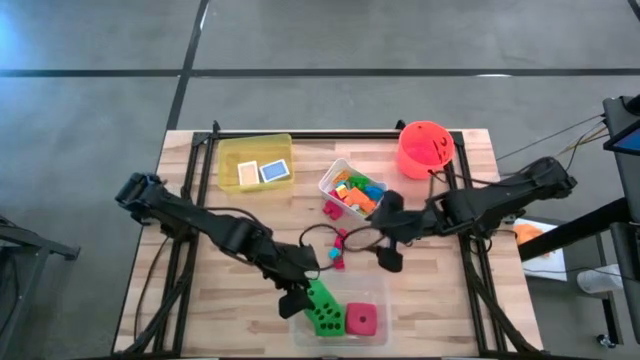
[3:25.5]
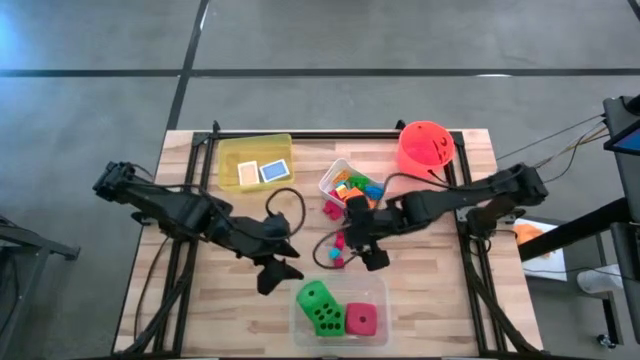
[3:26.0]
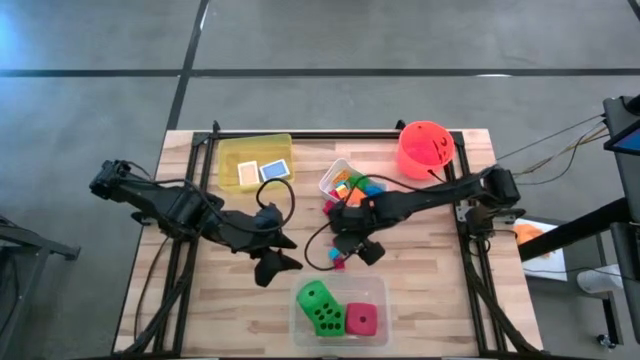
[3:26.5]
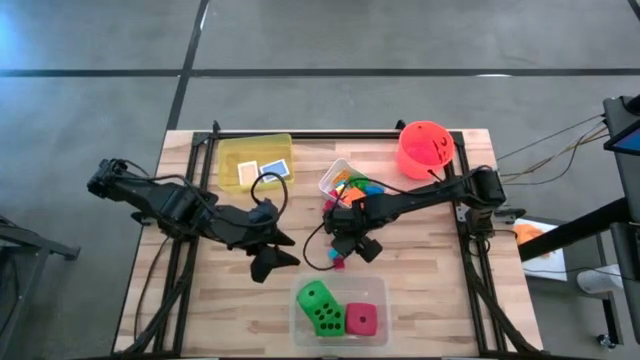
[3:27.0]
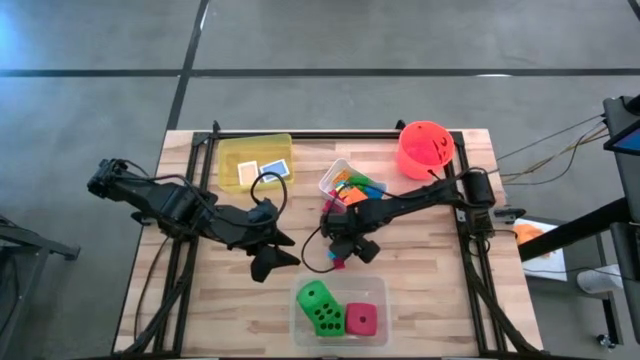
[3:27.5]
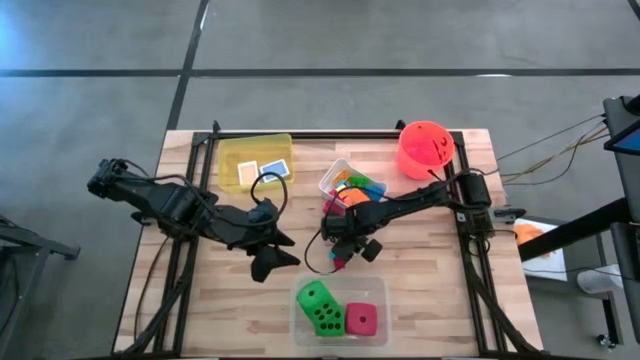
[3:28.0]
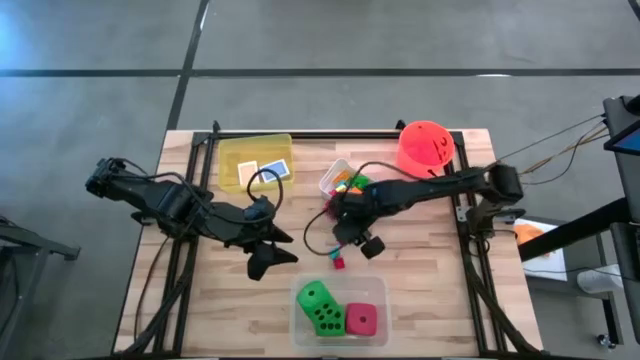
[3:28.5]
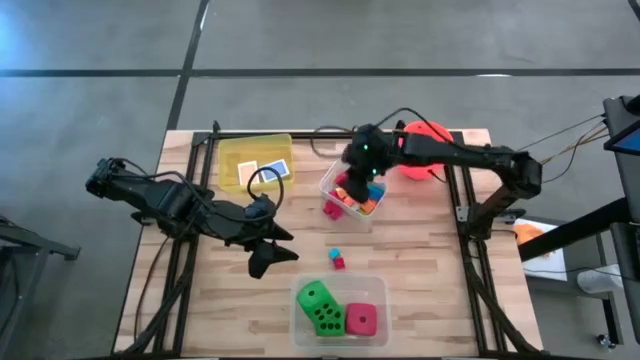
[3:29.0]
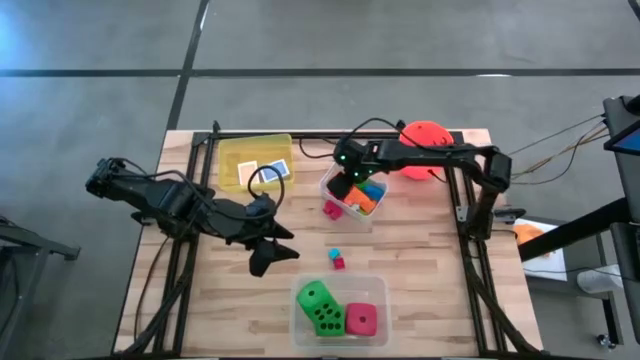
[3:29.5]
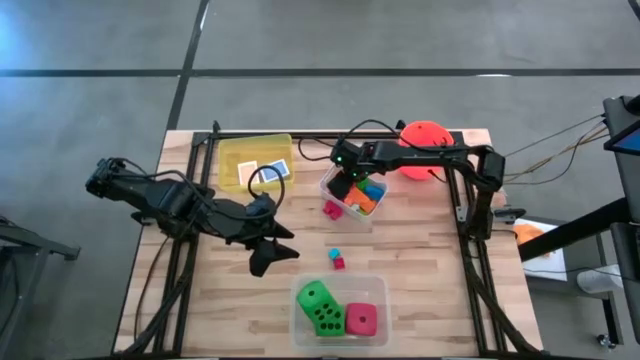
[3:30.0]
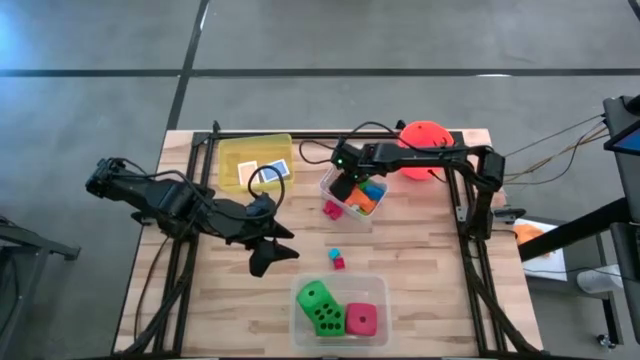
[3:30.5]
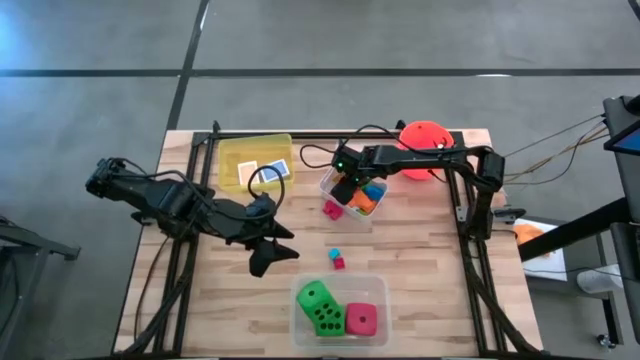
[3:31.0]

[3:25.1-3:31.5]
Task: Pick & Place Toys
Put the red game piece into the white bin

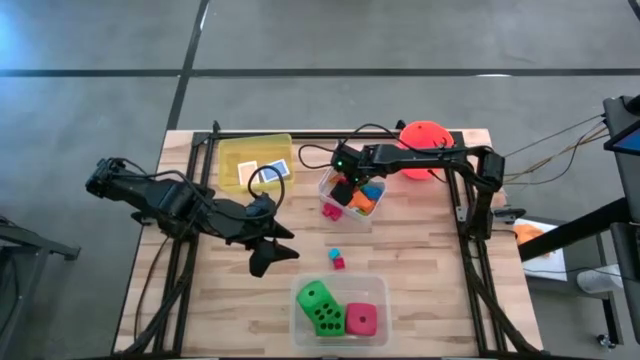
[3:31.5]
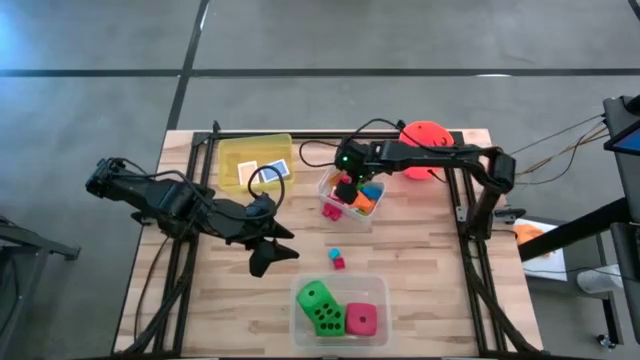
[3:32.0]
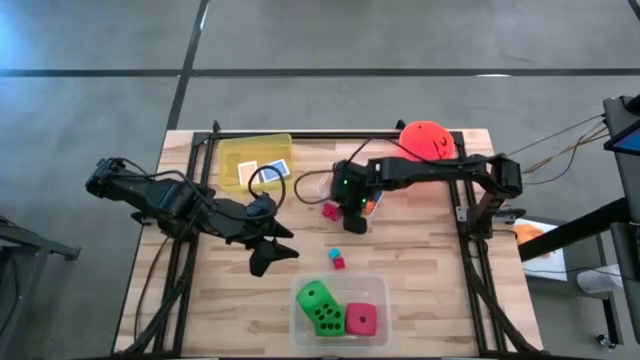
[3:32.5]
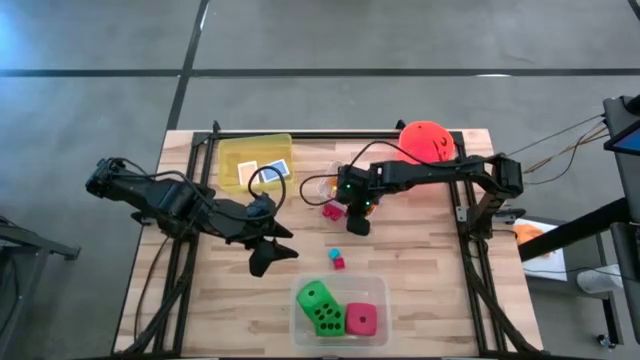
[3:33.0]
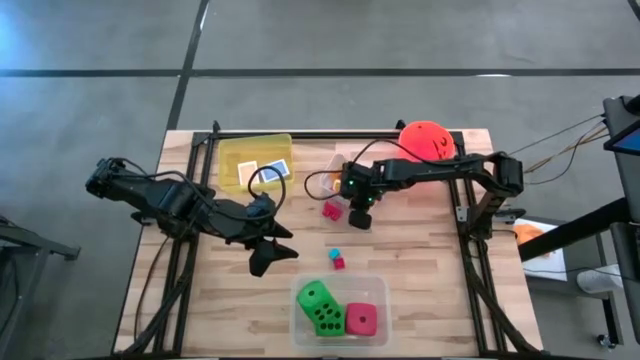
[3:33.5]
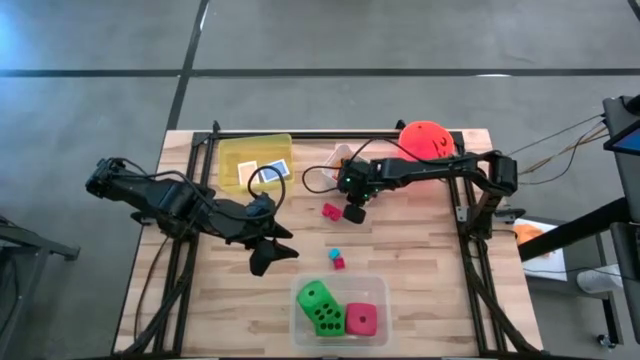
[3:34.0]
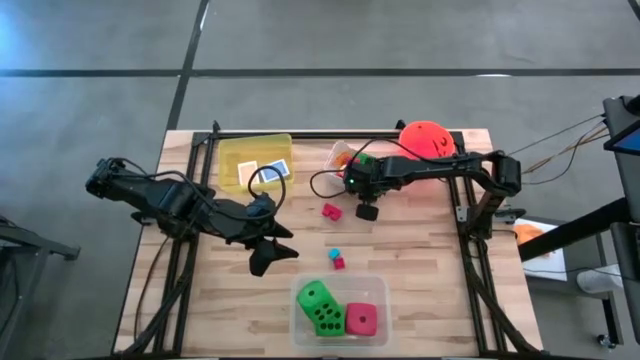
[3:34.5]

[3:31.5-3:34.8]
Adjust the white bin

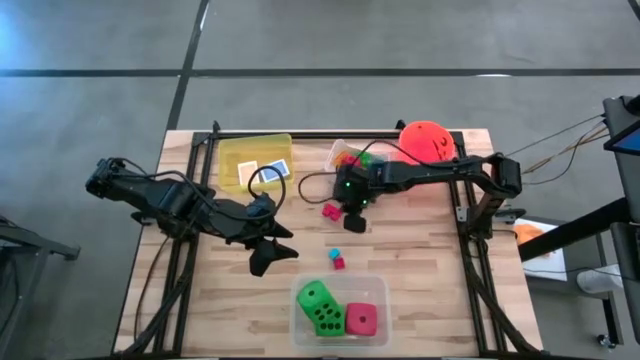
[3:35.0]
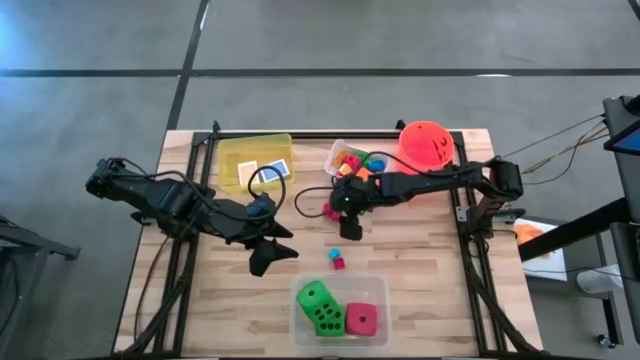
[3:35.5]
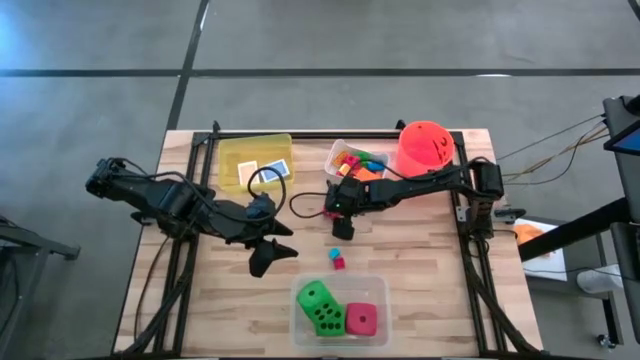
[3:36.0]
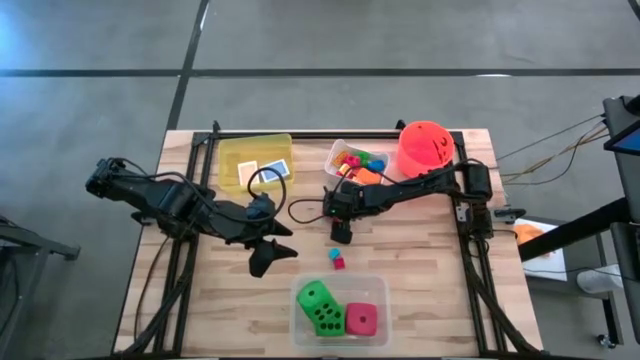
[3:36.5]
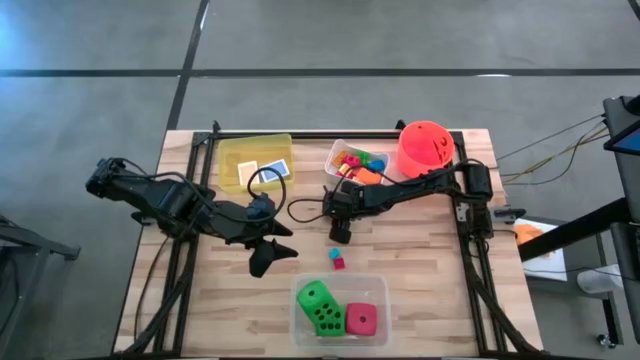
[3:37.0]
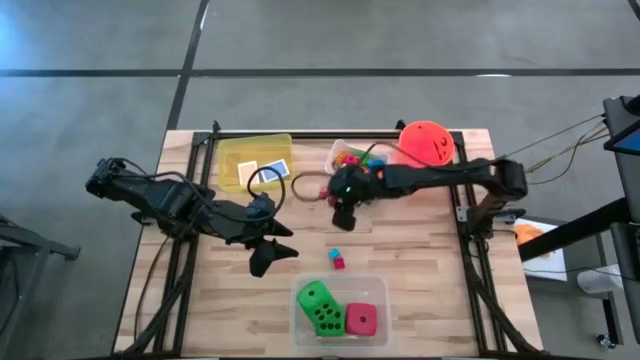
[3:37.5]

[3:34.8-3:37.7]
Put the red game piece into the white bin

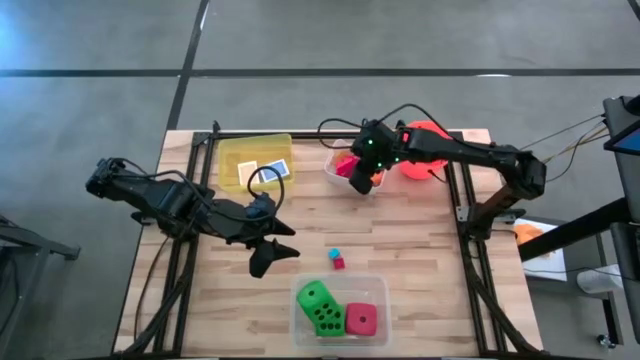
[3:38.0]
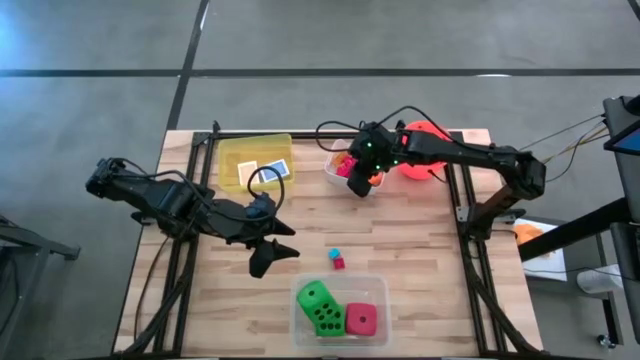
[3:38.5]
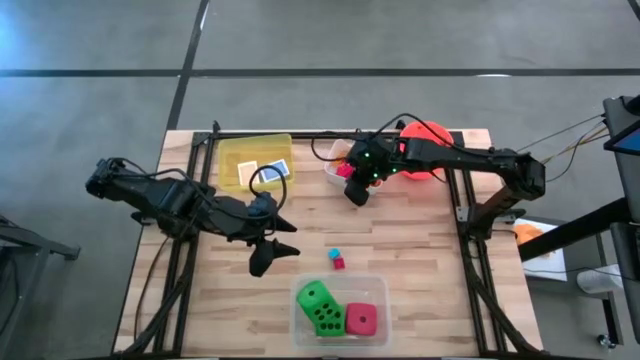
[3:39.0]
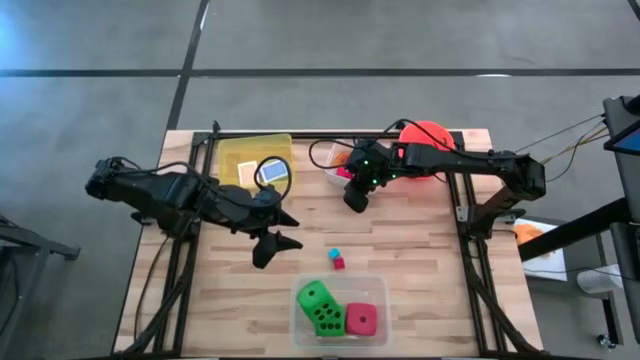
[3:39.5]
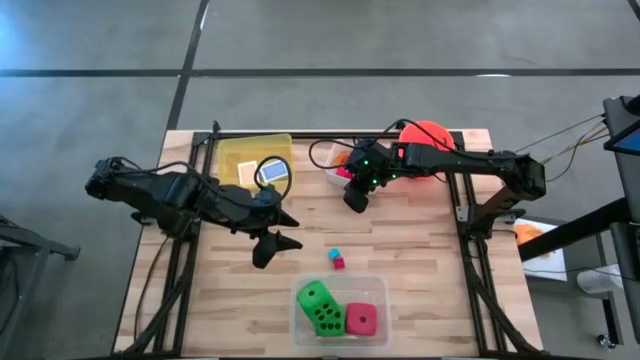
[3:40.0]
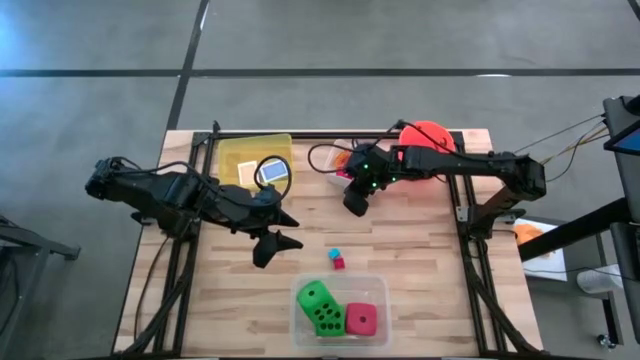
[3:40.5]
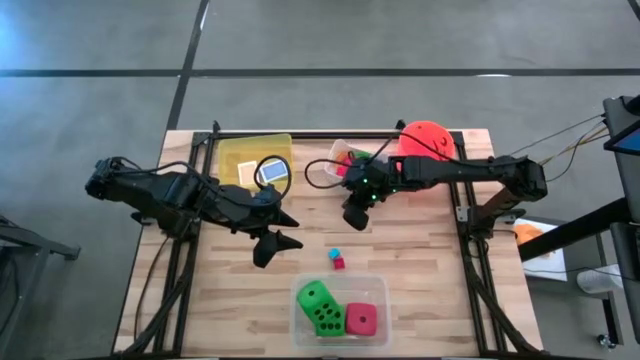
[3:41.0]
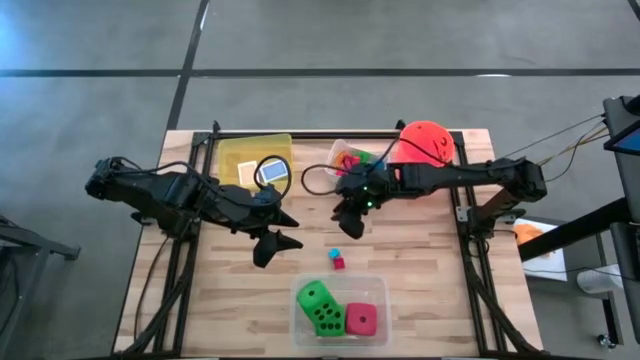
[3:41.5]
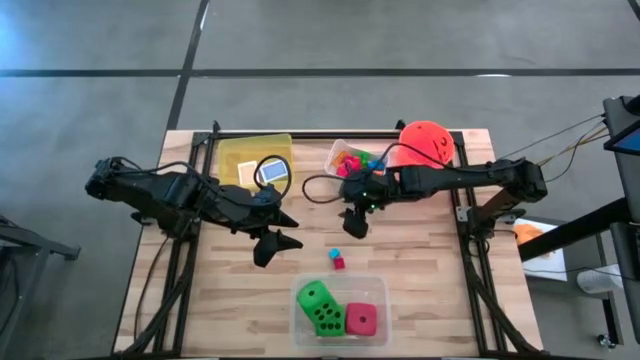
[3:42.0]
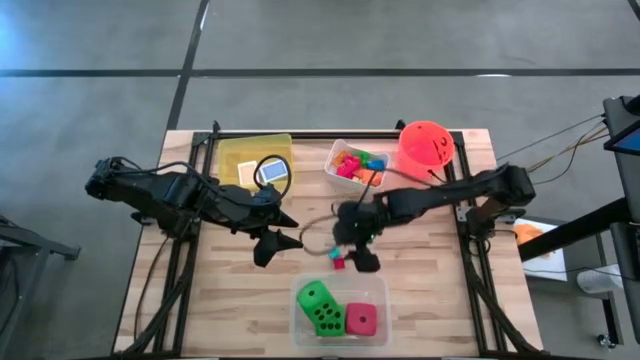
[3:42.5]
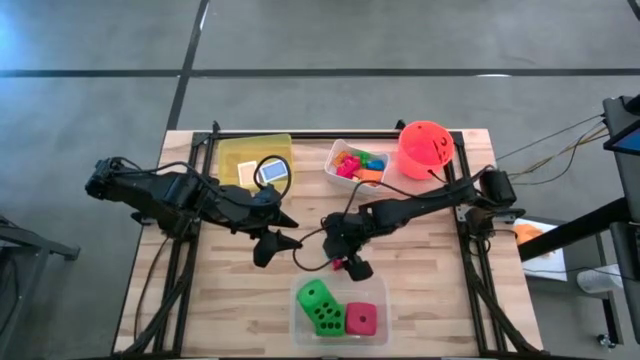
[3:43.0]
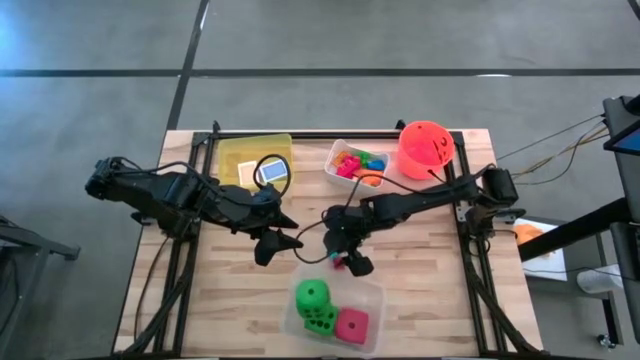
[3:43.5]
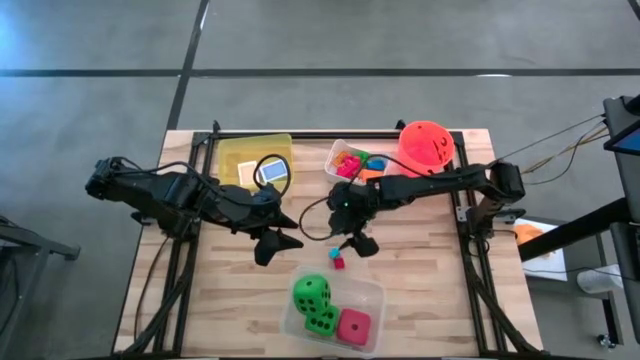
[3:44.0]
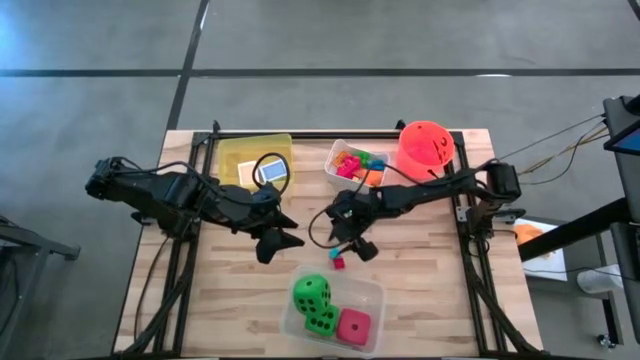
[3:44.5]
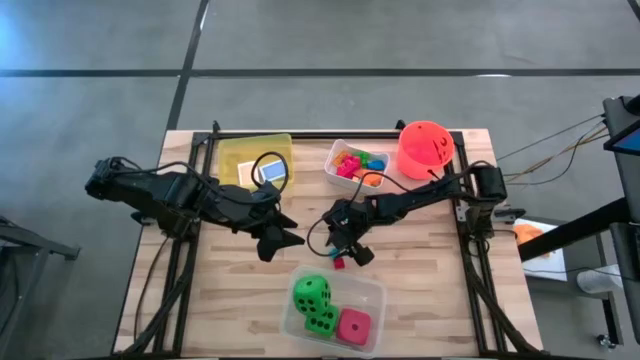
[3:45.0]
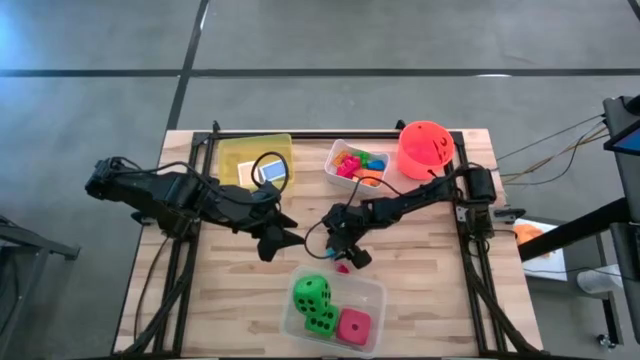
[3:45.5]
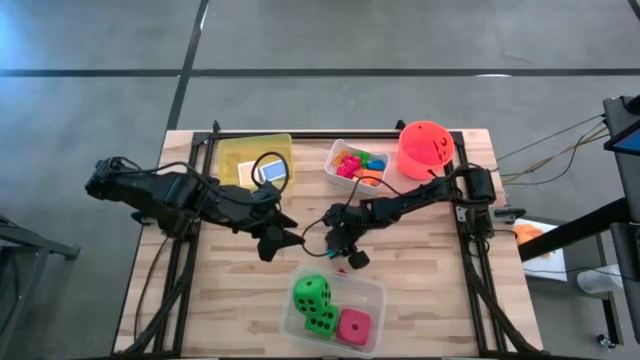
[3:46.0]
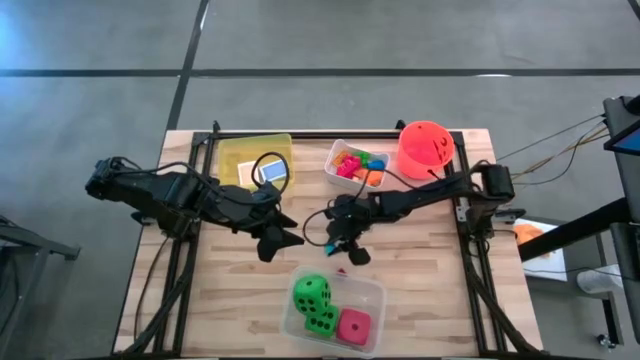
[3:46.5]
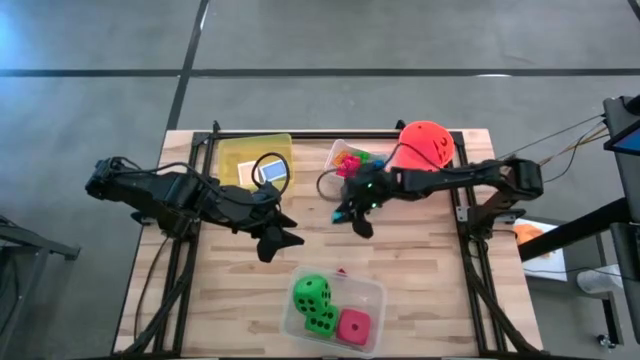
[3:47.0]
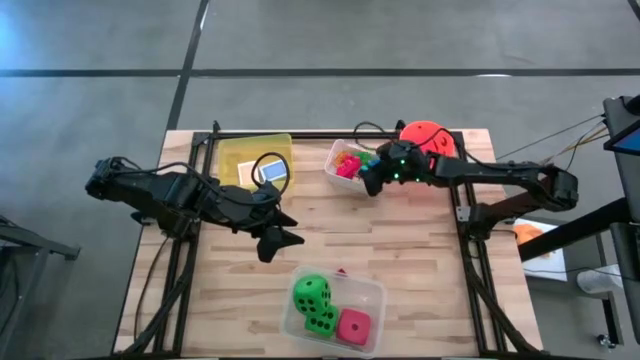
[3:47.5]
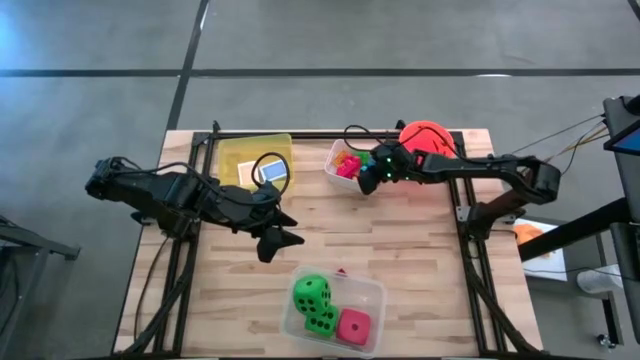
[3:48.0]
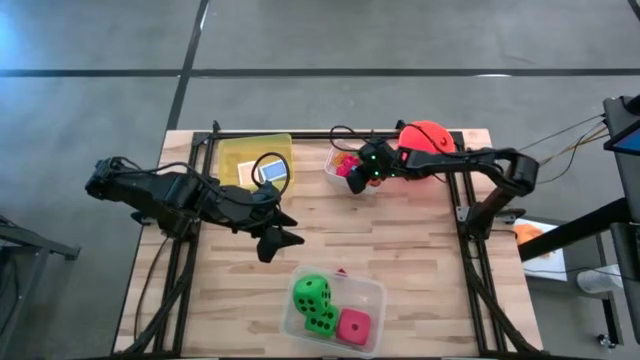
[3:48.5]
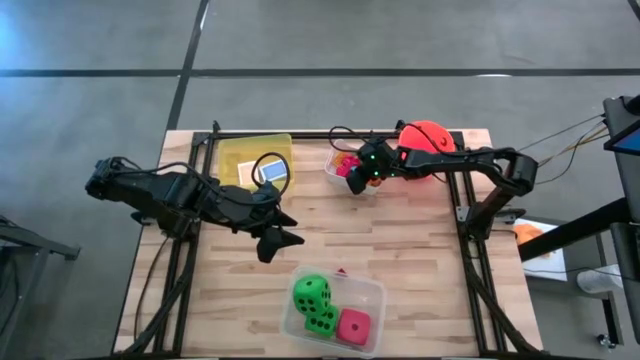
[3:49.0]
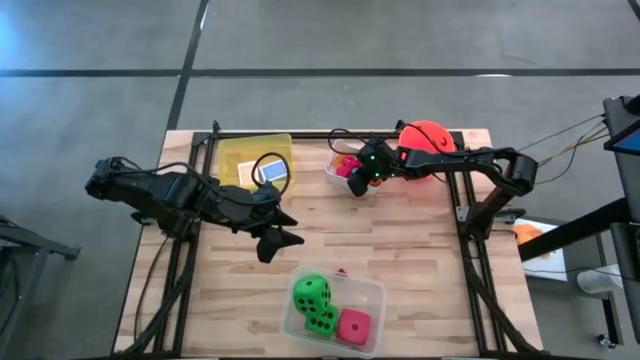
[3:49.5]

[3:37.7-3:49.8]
Put the blue game piece into the white bin
